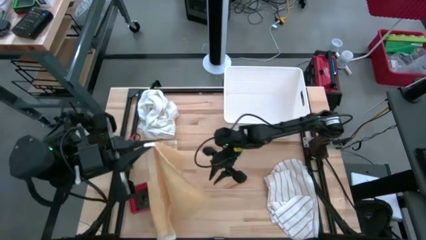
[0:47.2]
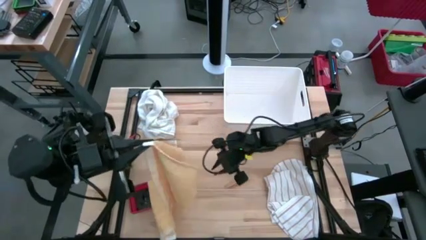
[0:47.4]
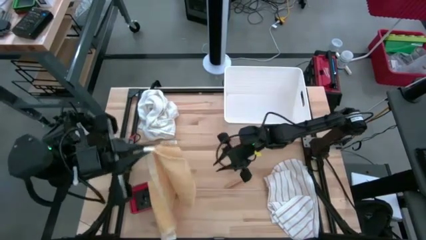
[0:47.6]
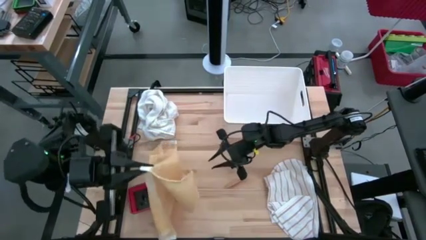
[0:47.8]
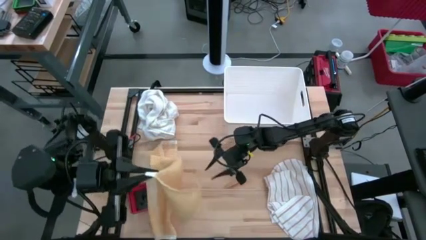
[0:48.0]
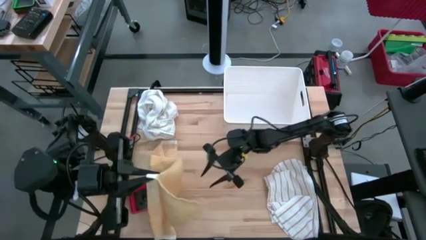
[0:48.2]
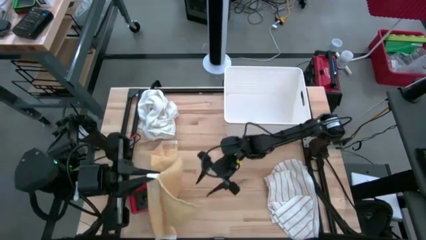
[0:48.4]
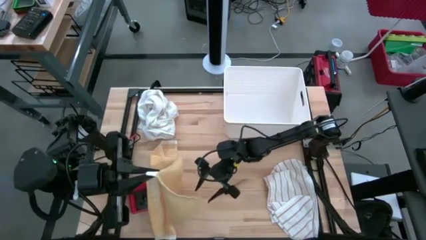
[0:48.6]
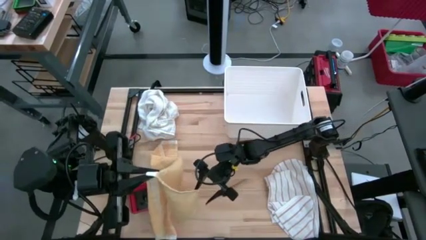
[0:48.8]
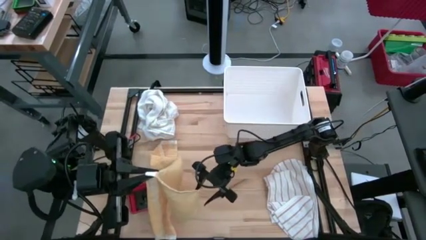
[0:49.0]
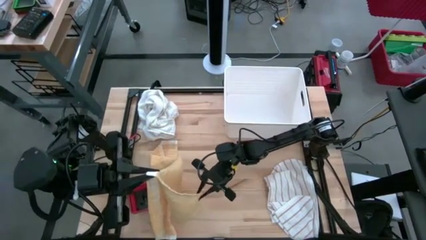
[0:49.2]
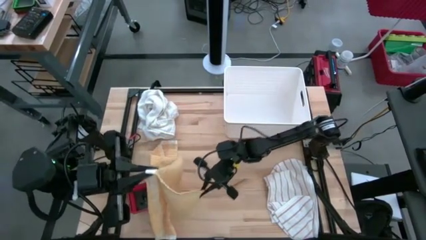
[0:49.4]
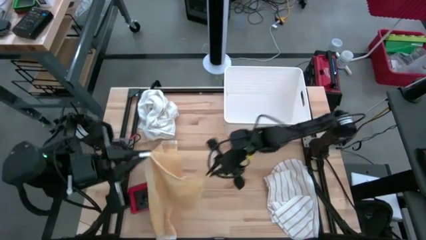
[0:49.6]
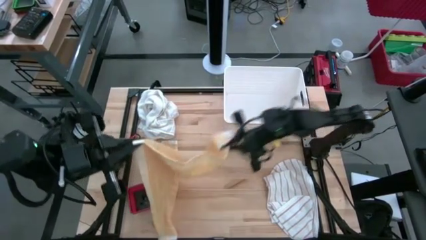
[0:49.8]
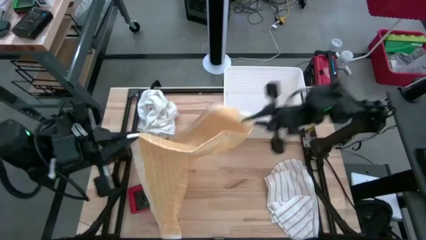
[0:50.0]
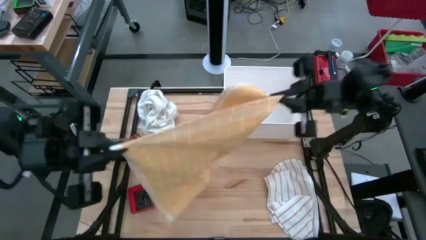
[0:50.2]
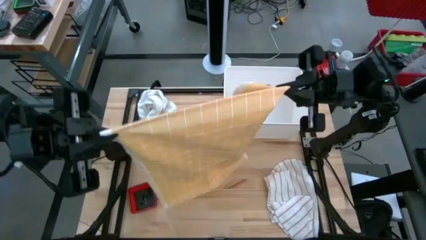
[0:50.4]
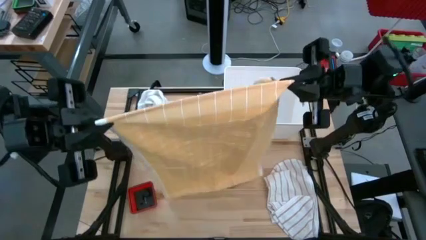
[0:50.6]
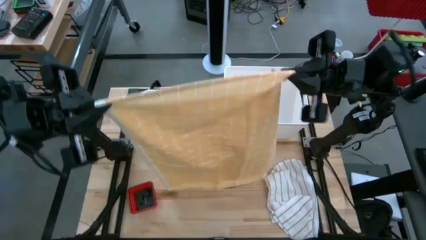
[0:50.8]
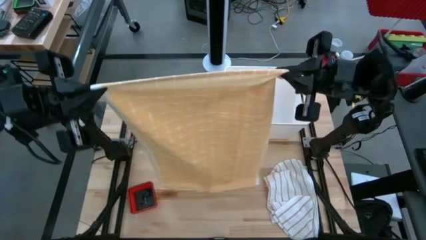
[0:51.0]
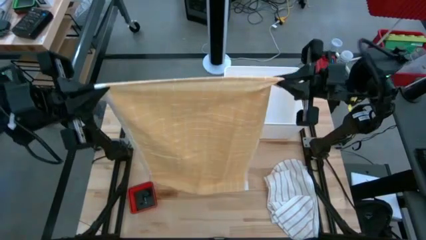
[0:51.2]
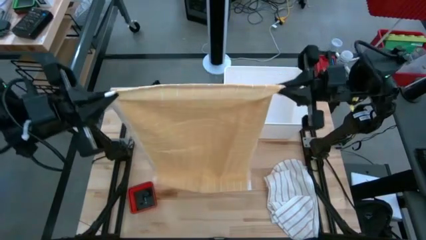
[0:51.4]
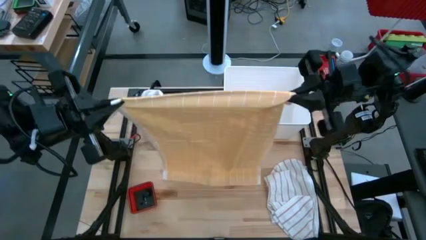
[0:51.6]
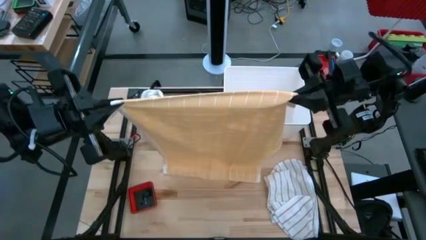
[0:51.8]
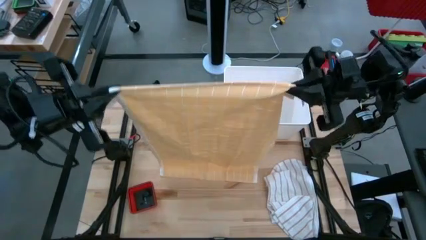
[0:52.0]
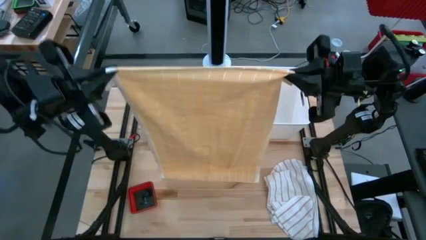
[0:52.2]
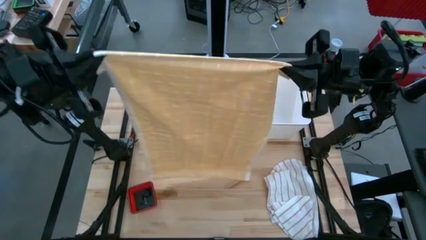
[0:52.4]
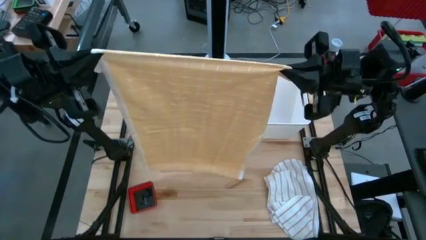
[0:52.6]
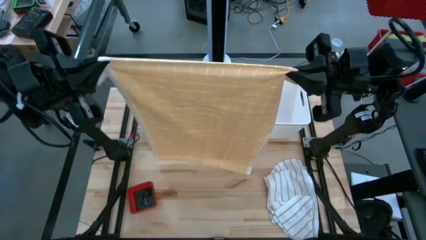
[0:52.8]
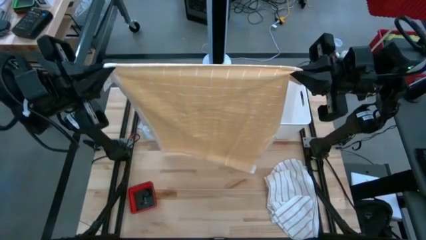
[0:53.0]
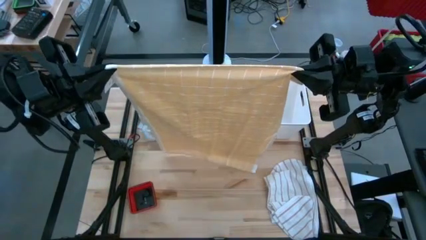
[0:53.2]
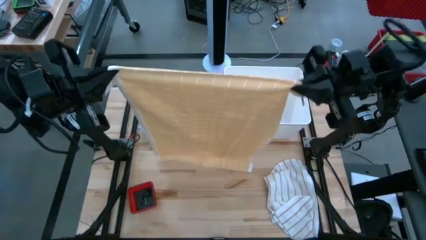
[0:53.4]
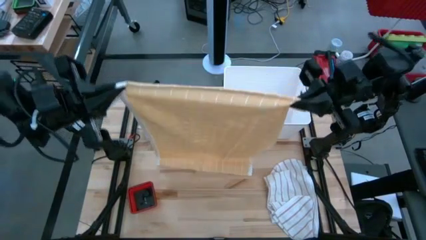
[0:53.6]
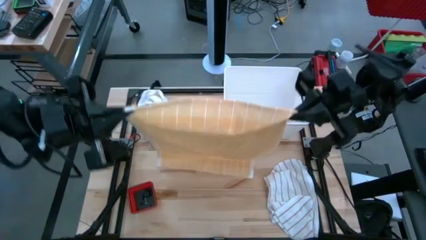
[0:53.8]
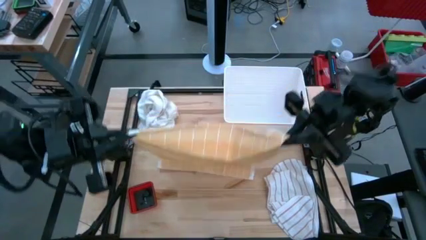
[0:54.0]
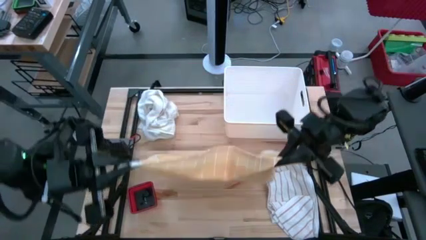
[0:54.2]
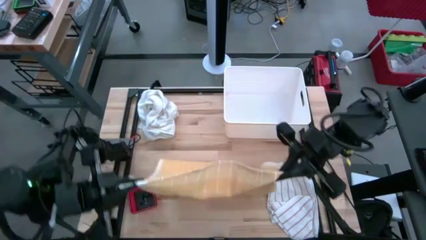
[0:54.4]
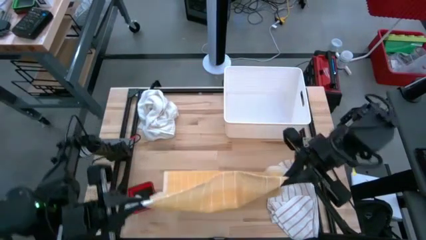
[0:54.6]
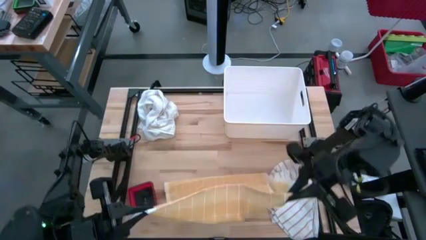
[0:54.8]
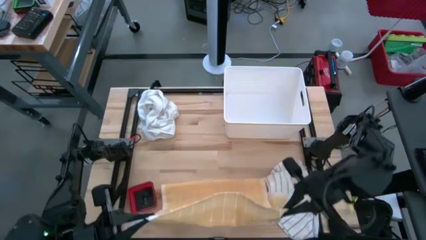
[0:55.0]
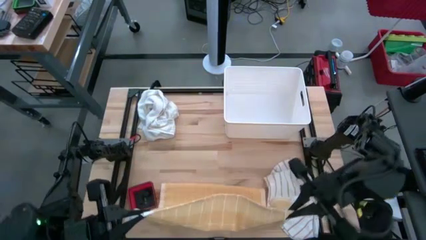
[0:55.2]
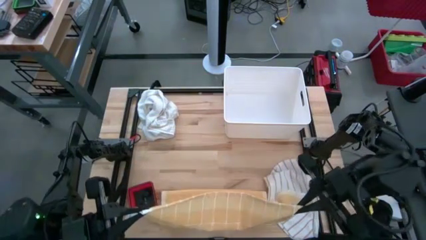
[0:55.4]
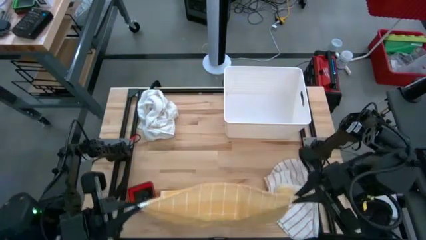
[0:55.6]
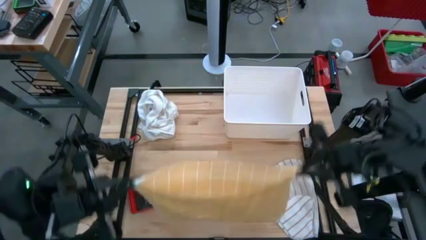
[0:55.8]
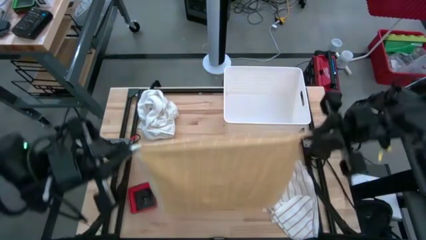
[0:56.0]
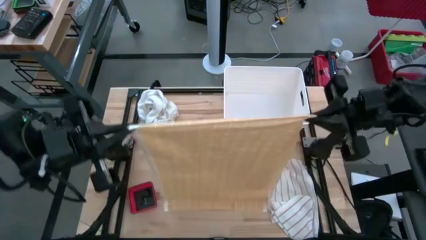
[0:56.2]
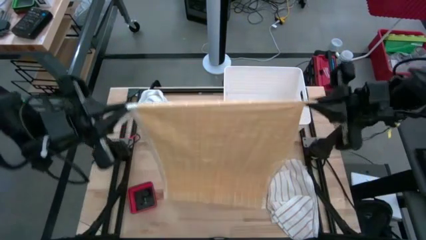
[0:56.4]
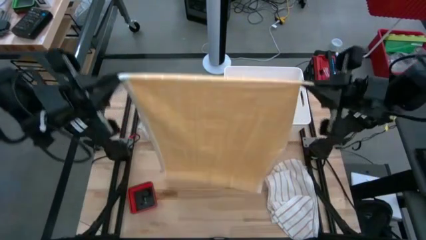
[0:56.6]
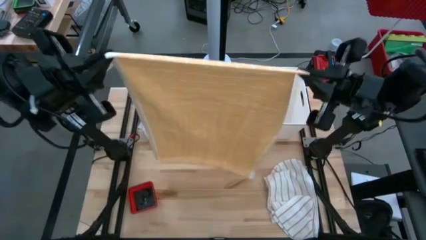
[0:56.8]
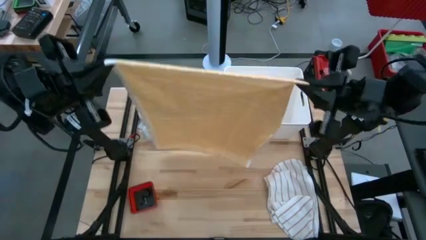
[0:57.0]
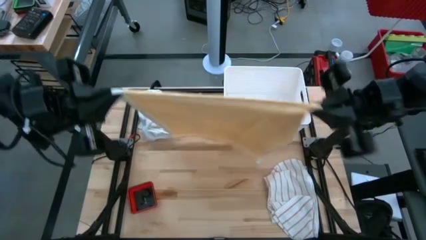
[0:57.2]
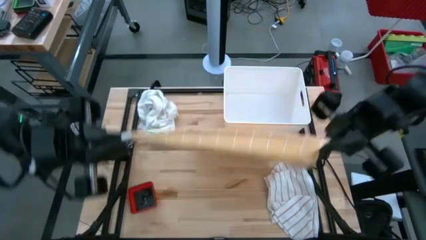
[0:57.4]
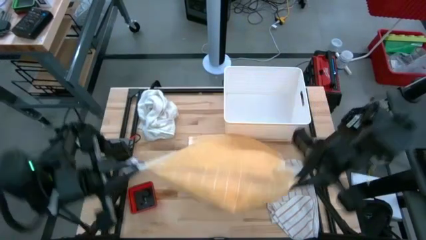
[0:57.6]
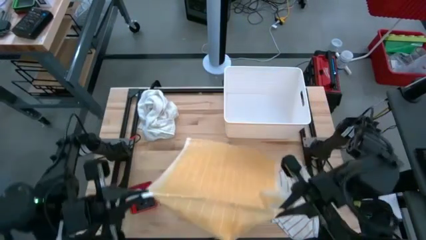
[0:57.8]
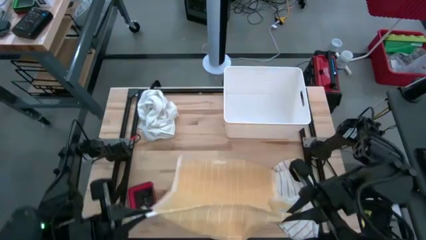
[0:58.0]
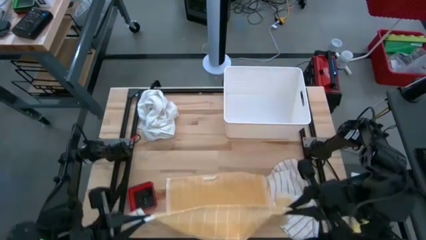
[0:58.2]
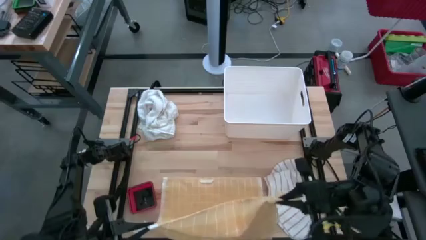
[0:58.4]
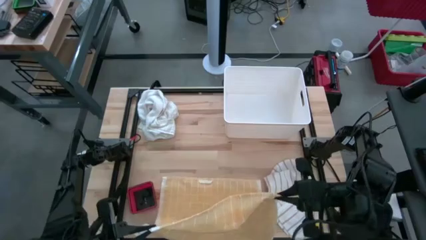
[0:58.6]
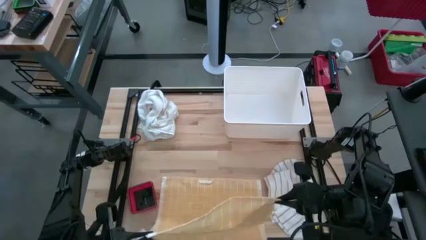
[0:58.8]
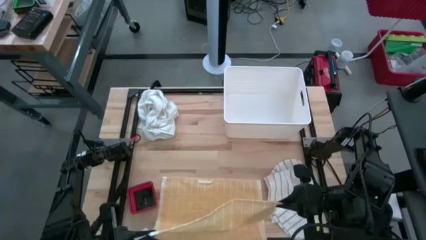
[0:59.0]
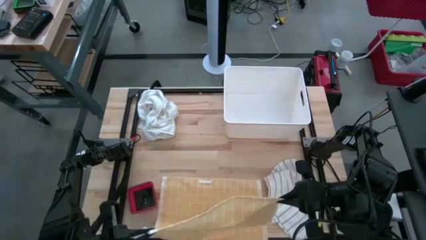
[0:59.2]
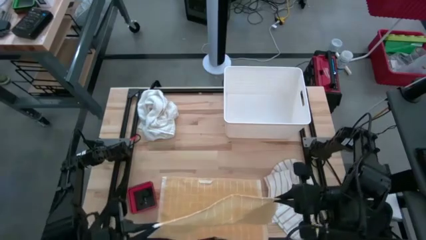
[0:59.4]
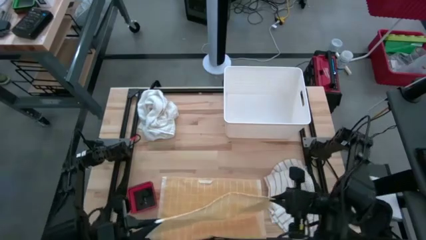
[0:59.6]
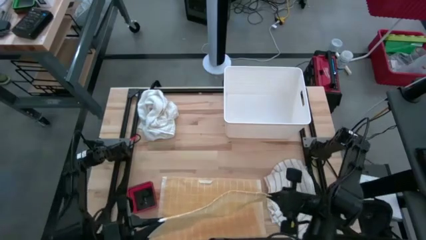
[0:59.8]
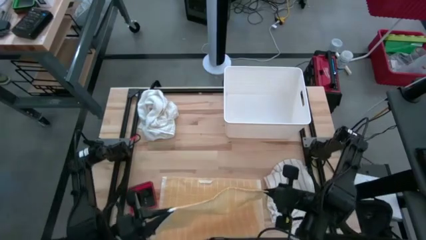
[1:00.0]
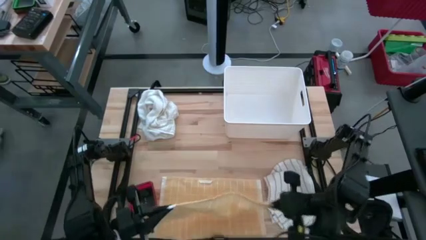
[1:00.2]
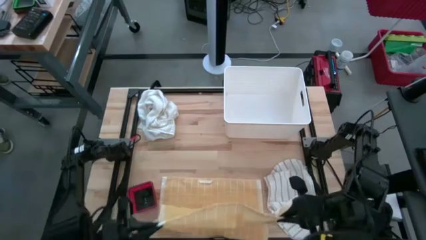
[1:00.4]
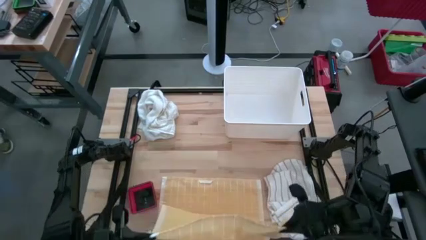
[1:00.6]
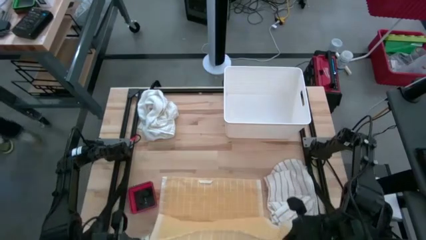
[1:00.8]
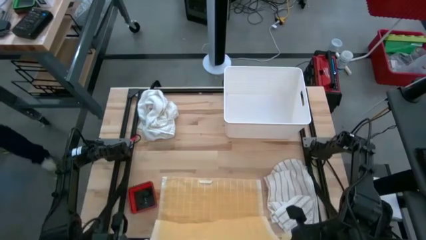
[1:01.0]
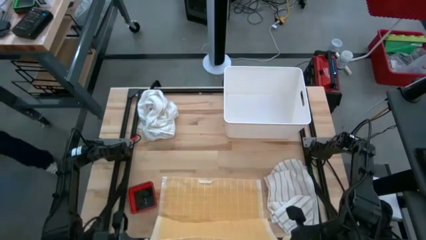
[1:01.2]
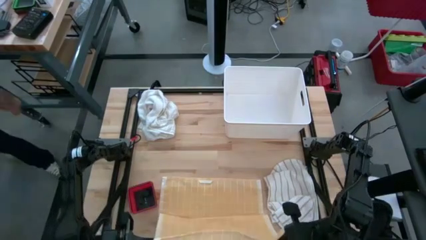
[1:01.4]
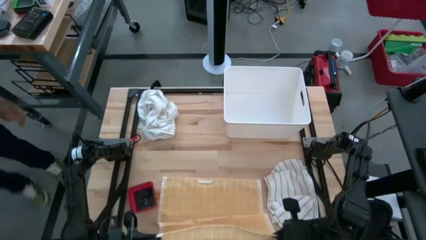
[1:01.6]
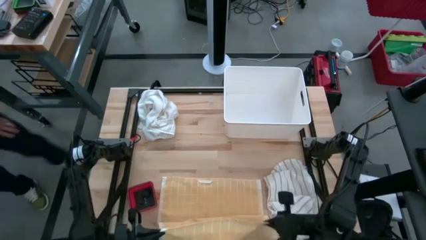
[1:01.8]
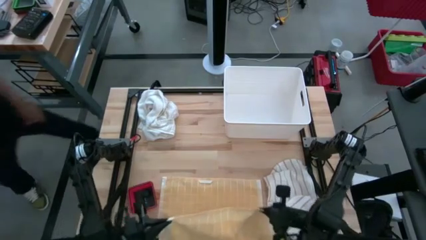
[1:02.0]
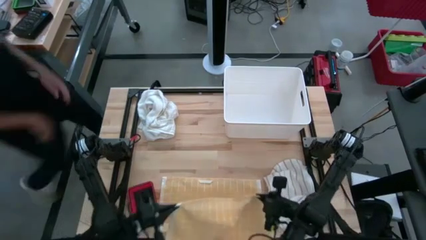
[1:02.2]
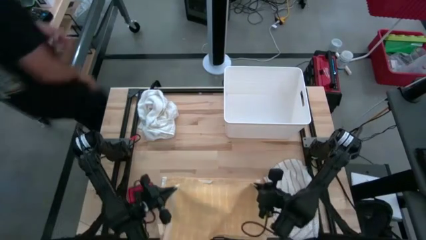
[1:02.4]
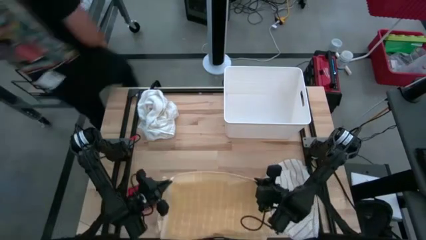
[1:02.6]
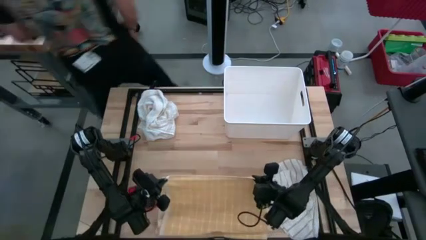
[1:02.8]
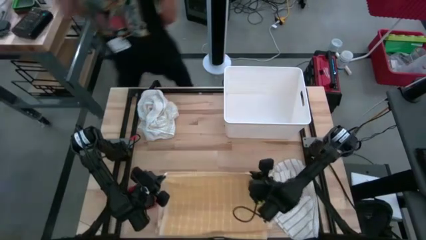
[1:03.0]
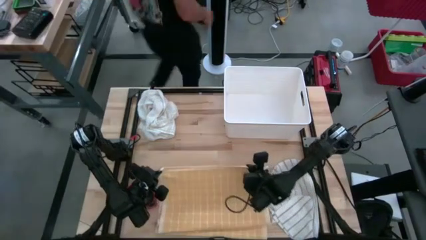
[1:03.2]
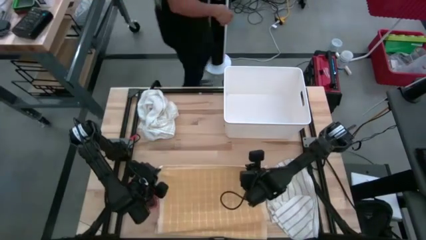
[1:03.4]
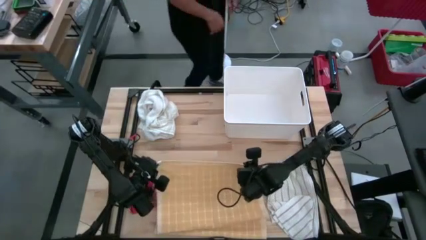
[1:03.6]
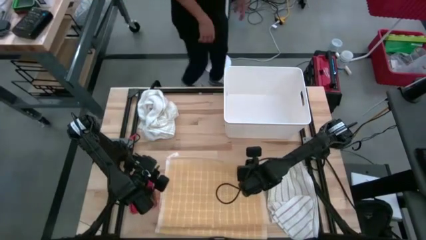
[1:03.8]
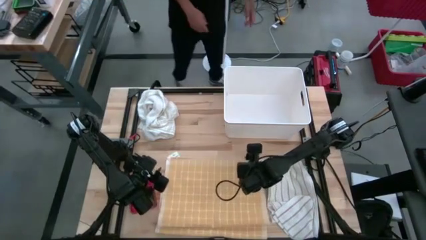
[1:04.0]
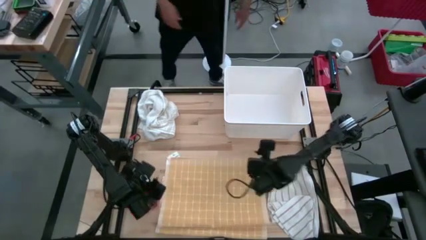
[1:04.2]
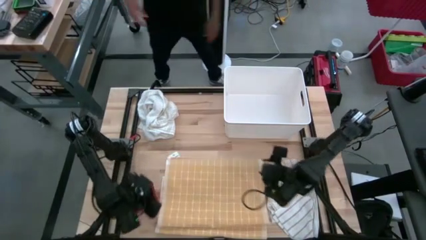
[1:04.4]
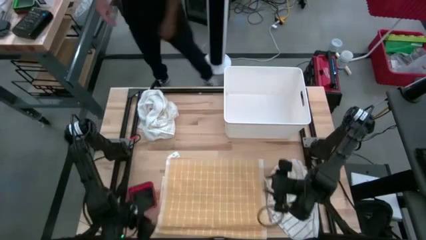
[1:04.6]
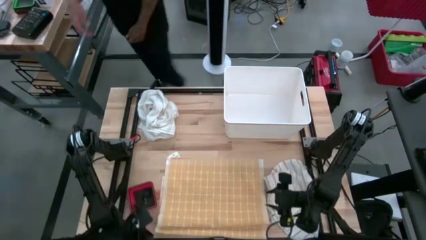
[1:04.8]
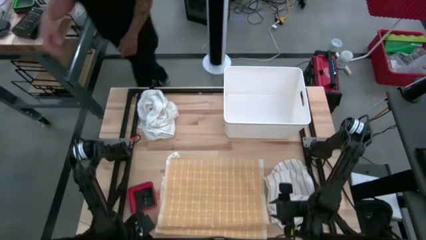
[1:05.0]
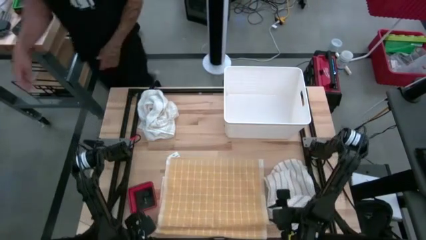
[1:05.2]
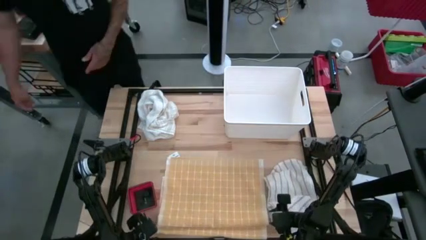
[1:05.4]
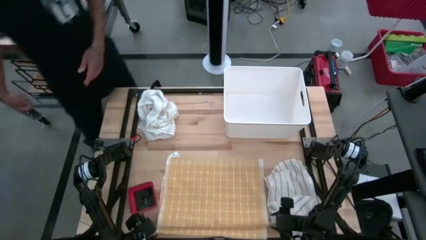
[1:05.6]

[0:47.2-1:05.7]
Task: Fold towel
Fold the yellow kitchen towel
